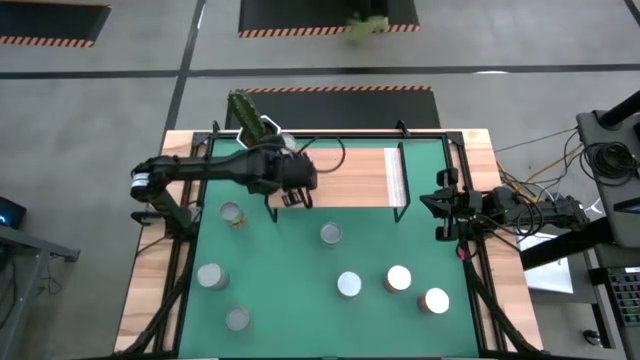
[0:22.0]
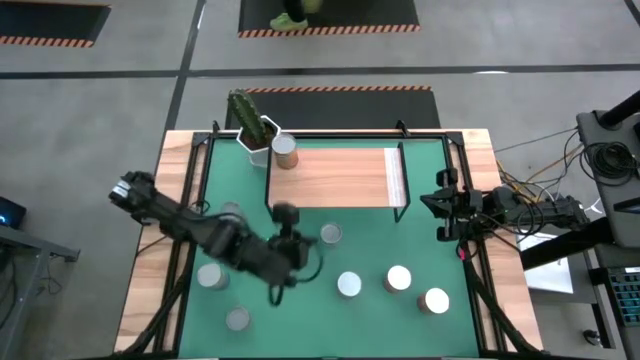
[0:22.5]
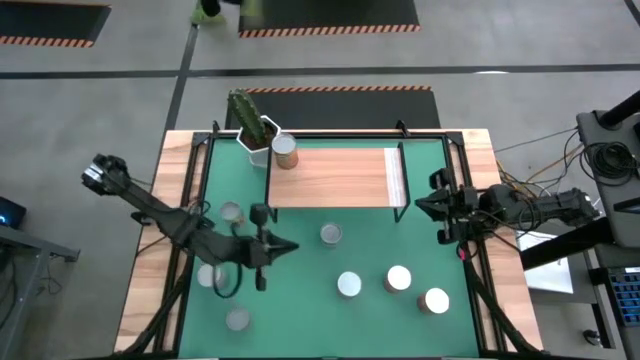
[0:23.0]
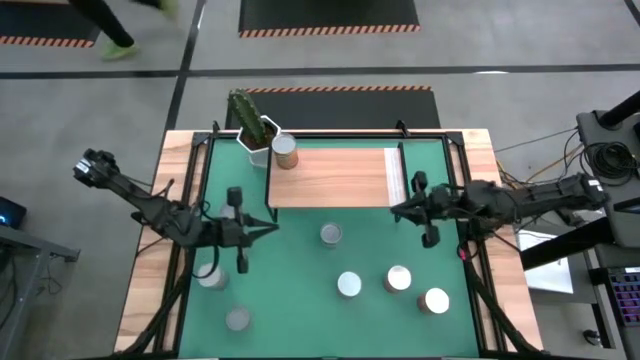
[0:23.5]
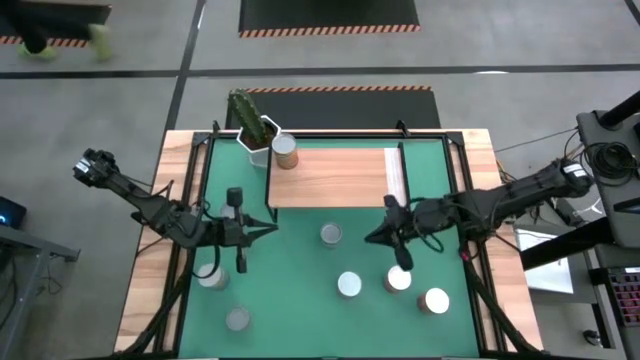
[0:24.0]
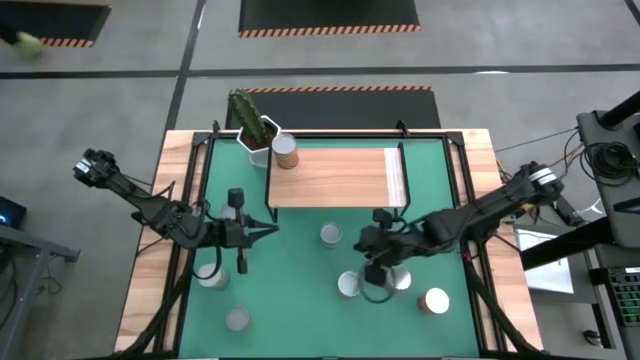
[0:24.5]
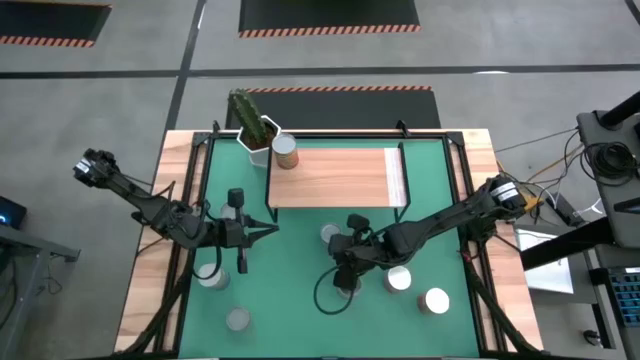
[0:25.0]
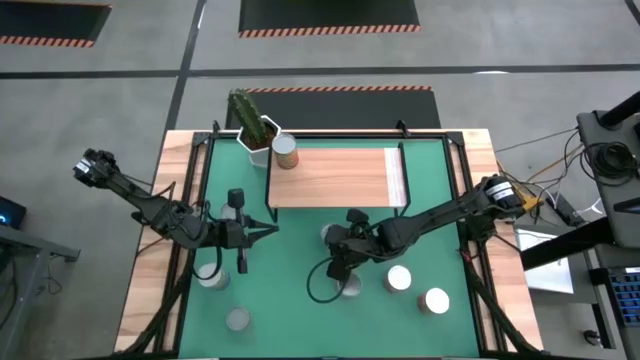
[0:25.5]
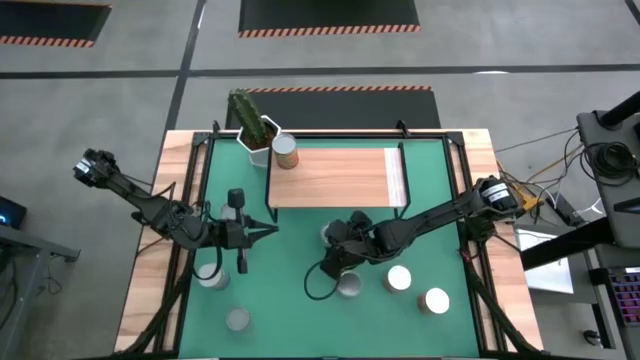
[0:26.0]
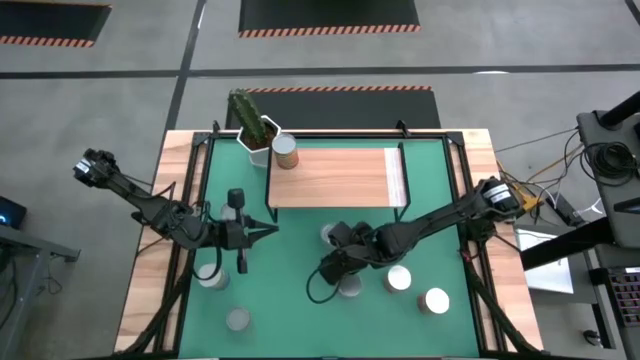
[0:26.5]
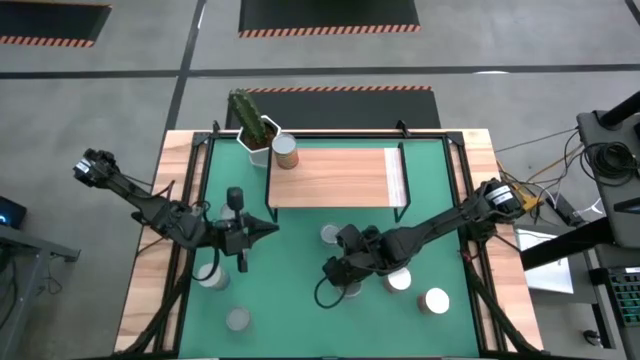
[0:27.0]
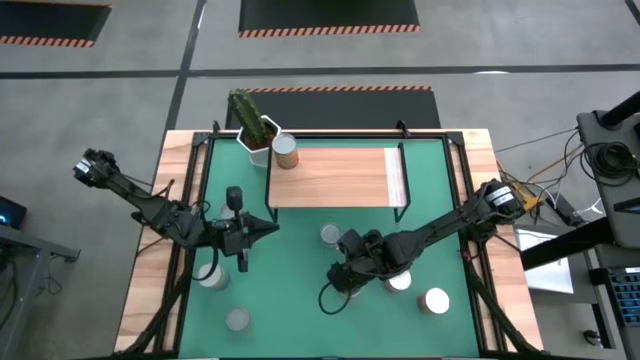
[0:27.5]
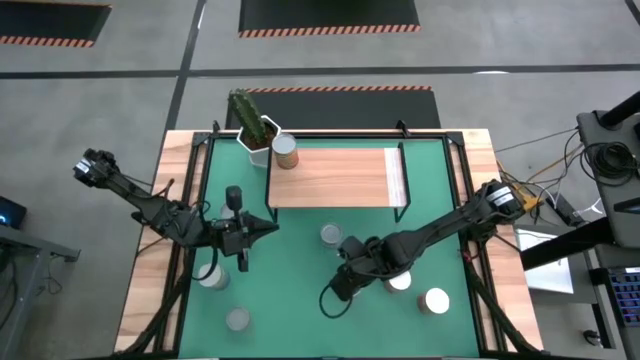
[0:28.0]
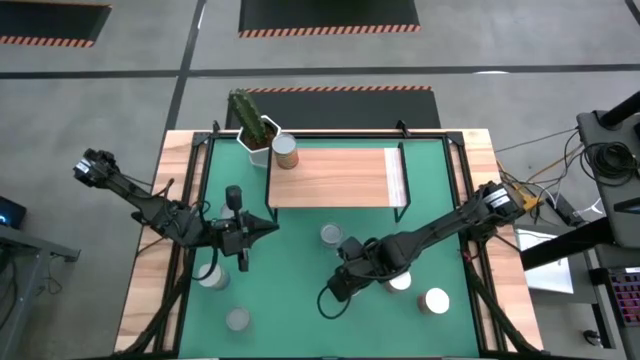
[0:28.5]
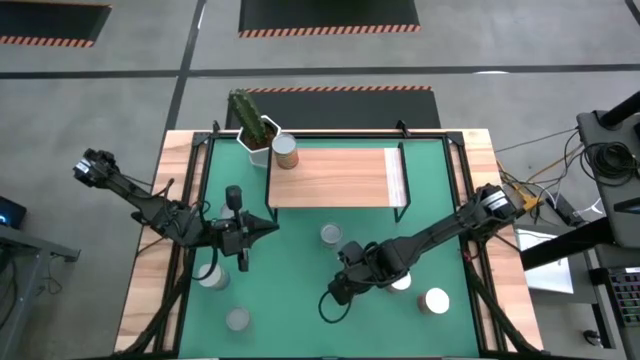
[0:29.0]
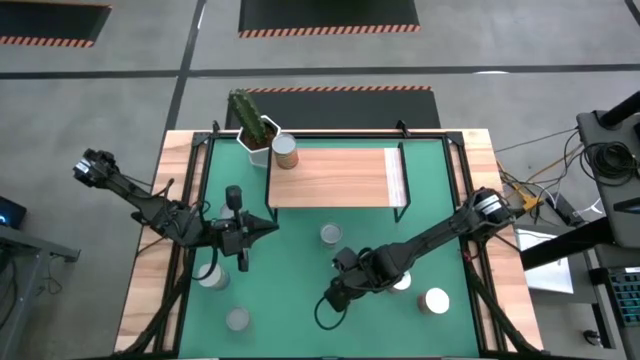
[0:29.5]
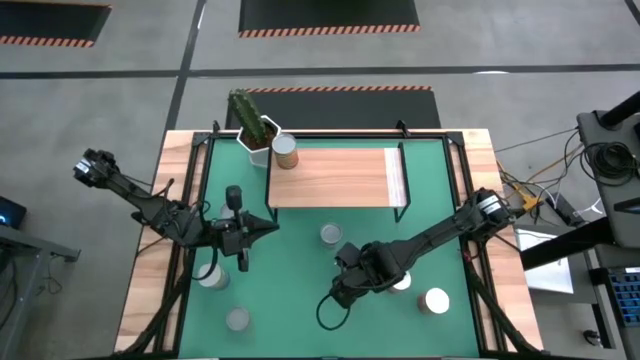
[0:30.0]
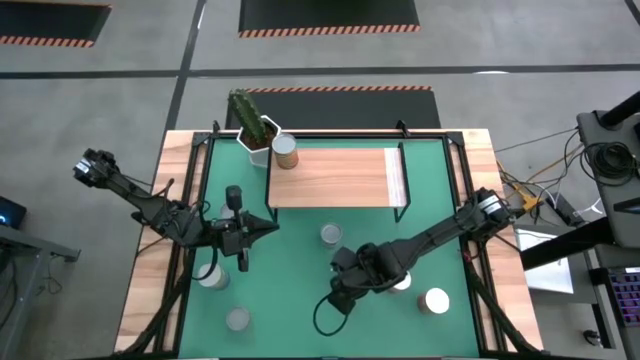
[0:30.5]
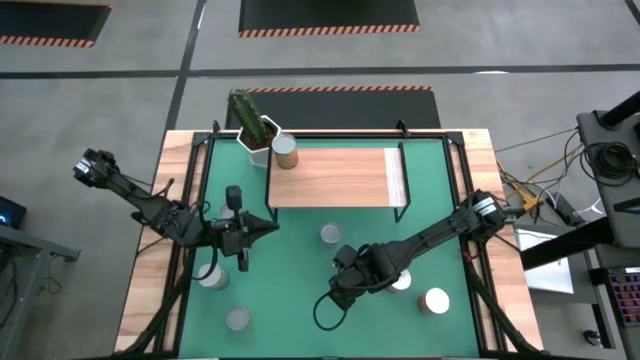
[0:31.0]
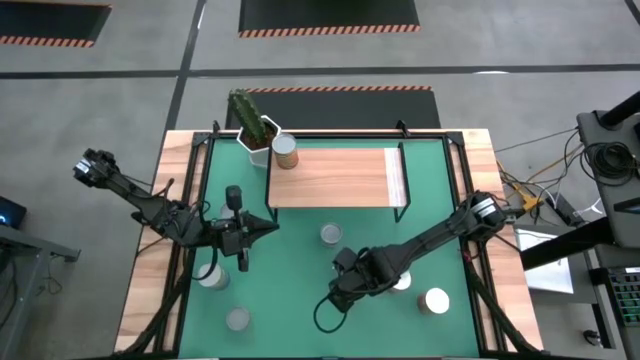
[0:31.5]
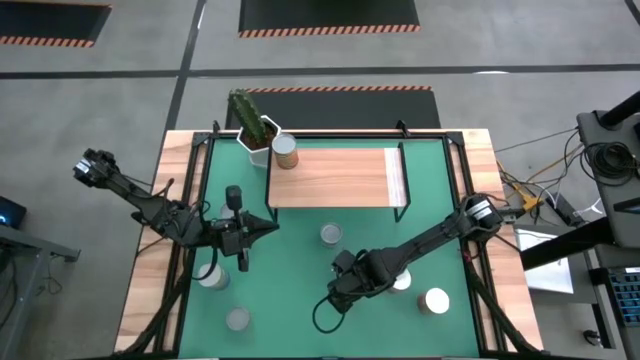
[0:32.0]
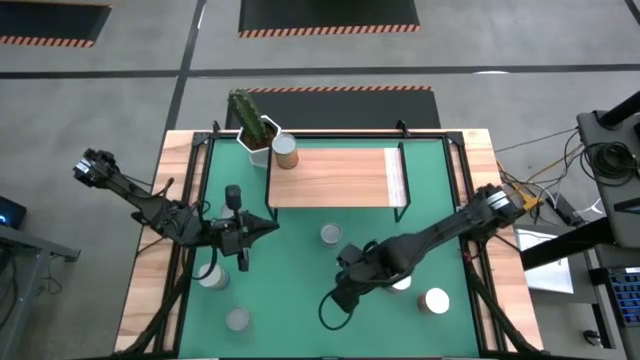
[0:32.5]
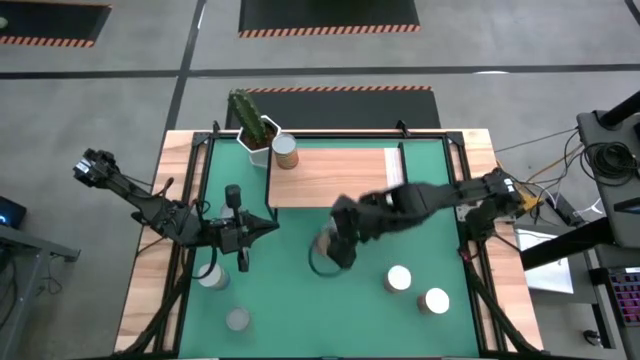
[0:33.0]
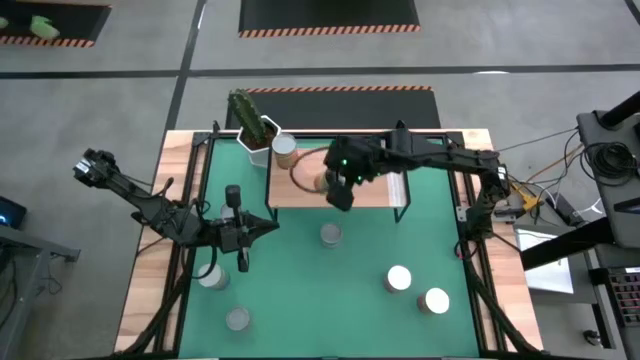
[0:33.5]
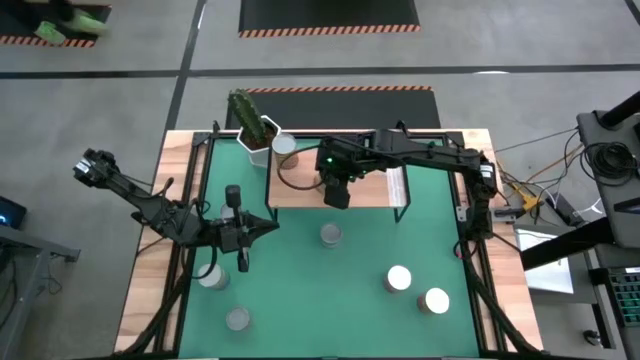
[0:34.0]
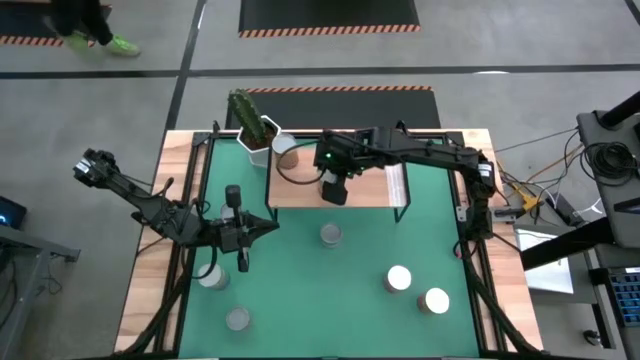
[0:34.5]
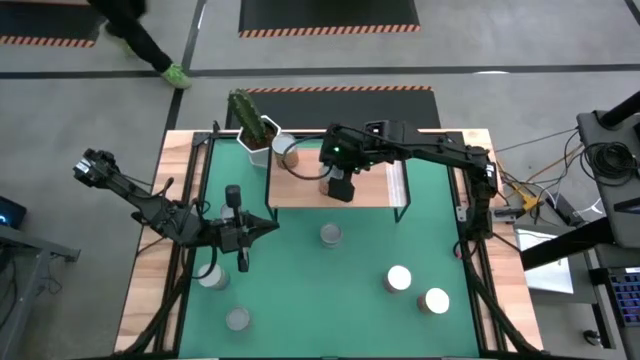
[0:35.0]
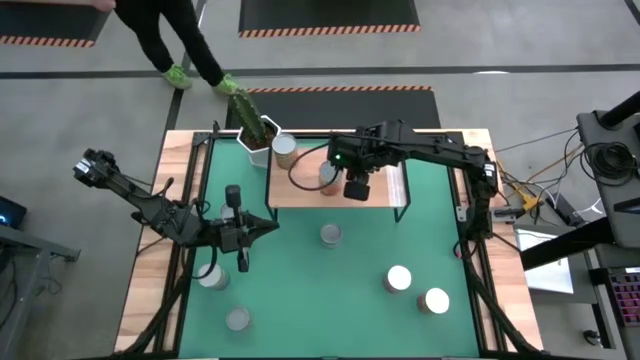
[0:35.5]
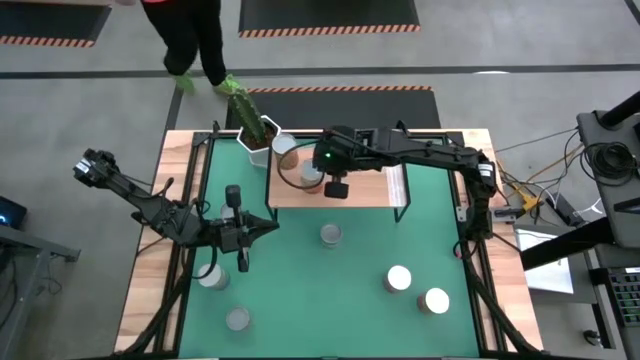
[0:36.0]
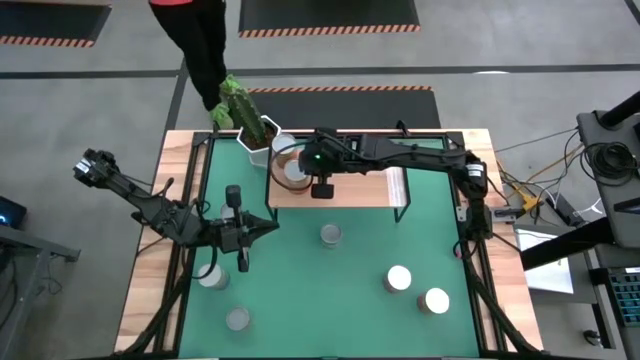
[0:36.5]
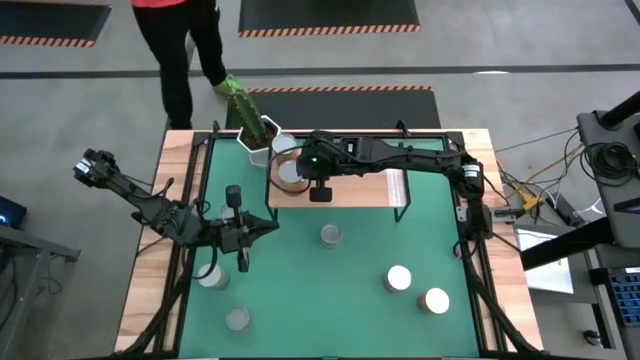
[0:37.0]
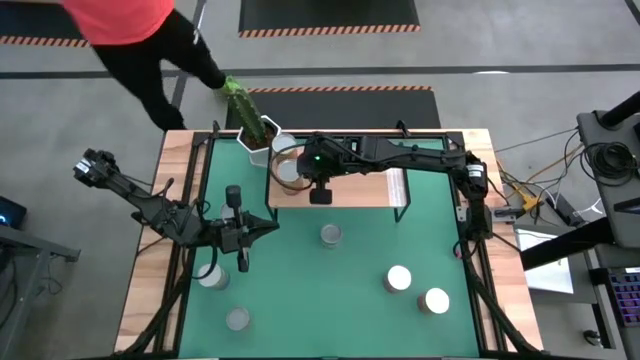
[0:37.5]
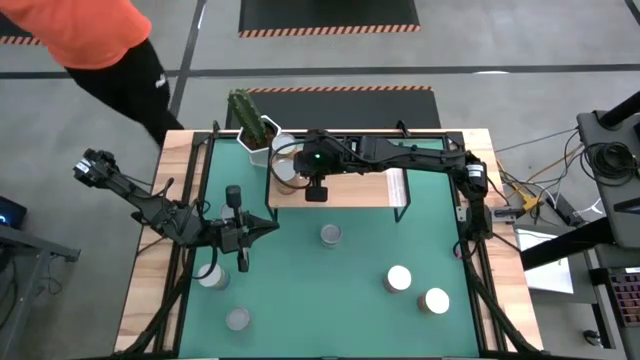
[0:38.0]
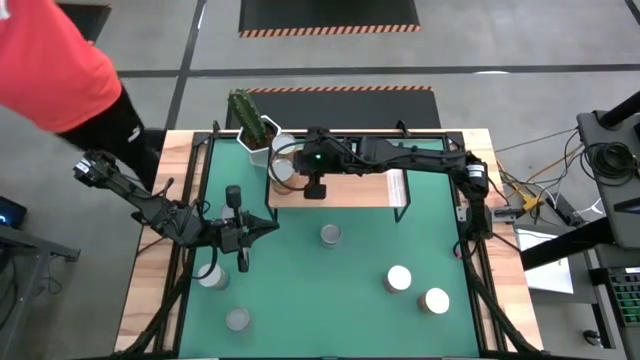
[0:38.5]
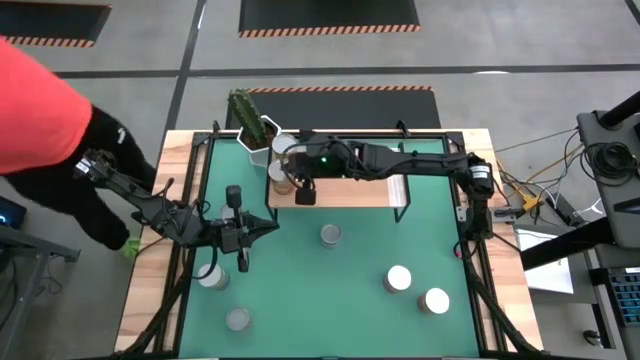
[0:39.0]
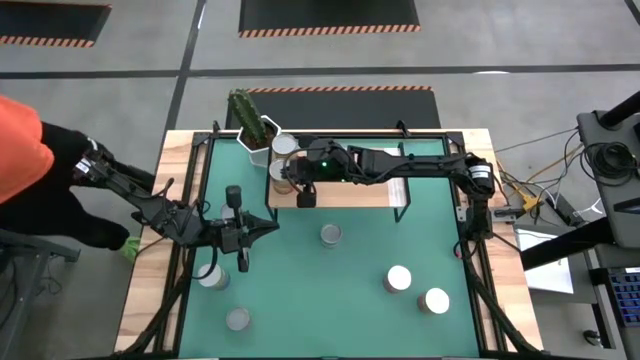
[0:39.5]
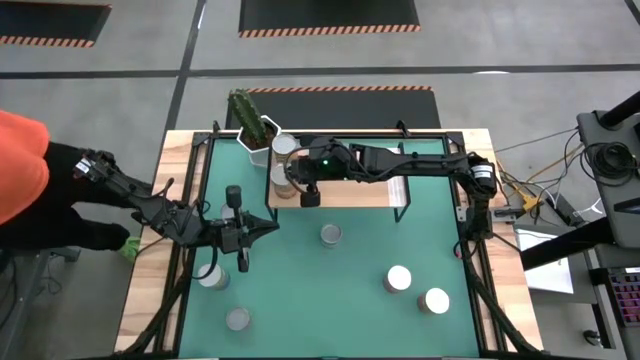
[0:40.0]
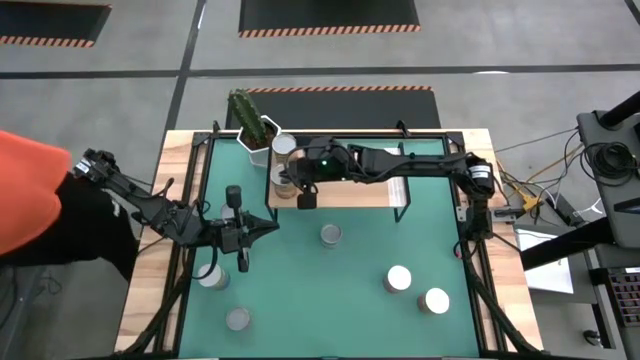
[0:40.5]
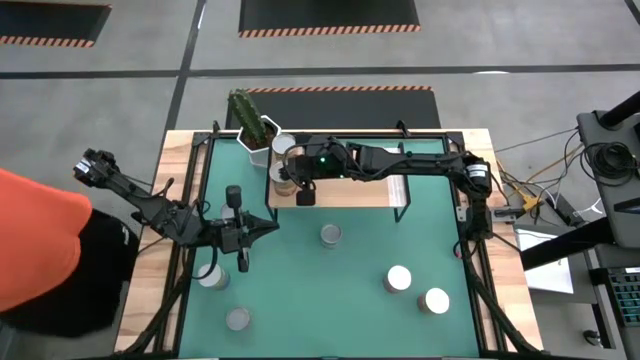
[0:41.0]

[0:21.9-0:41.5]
Task: Pick and place cans onto a shelf
Put the left canned corn on the shelf

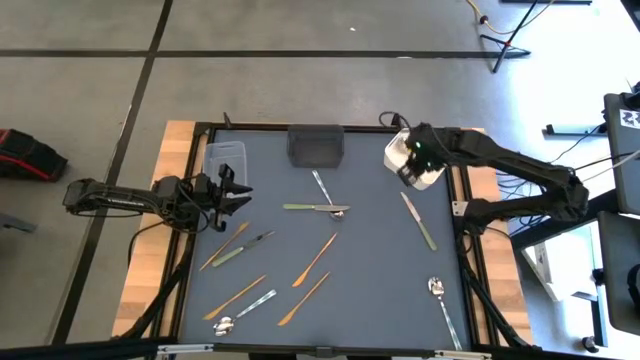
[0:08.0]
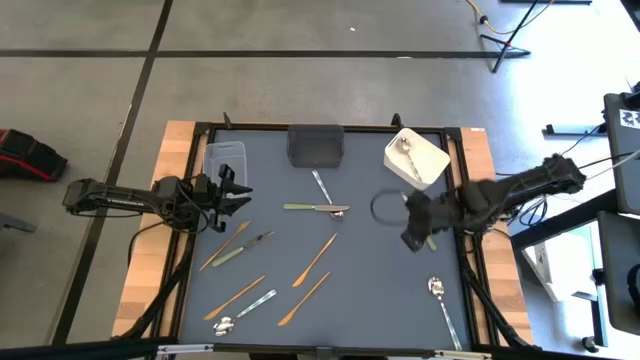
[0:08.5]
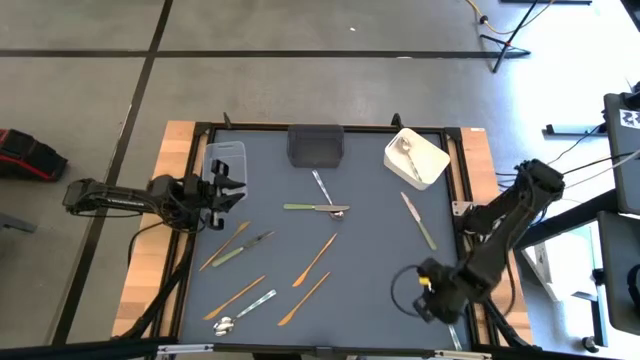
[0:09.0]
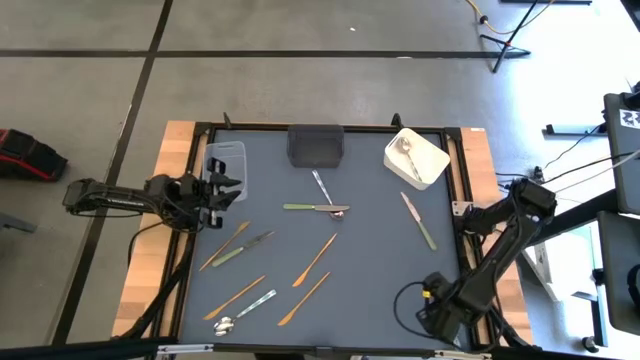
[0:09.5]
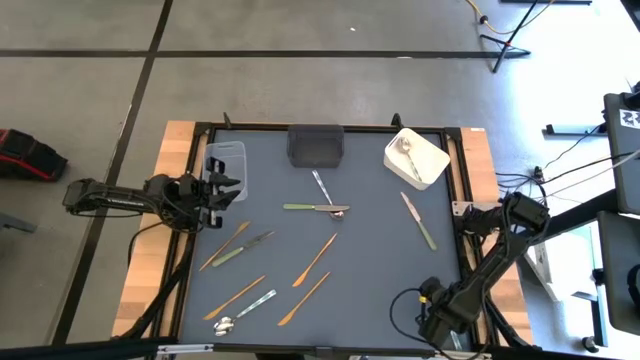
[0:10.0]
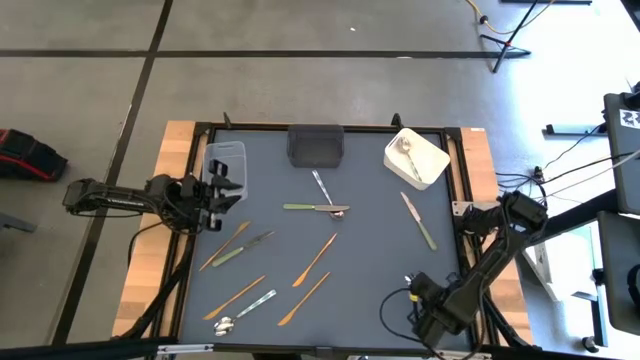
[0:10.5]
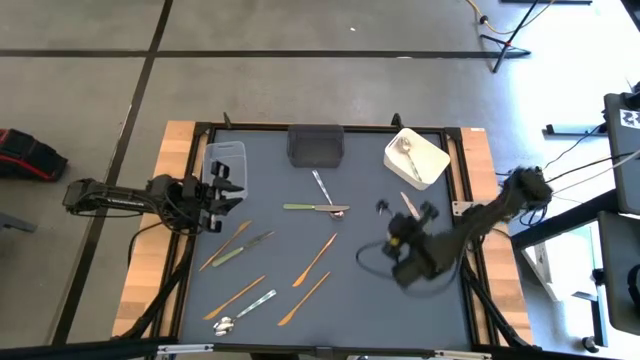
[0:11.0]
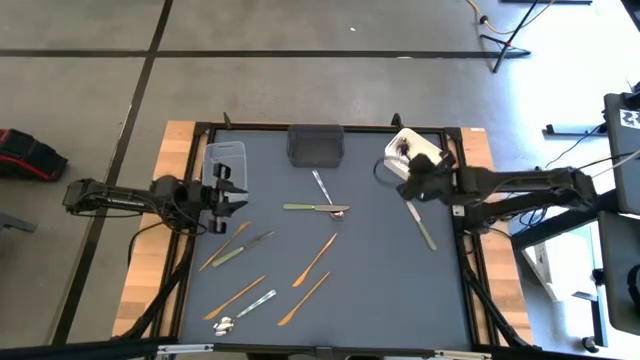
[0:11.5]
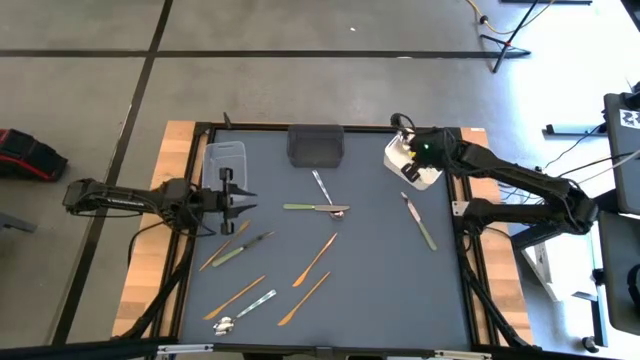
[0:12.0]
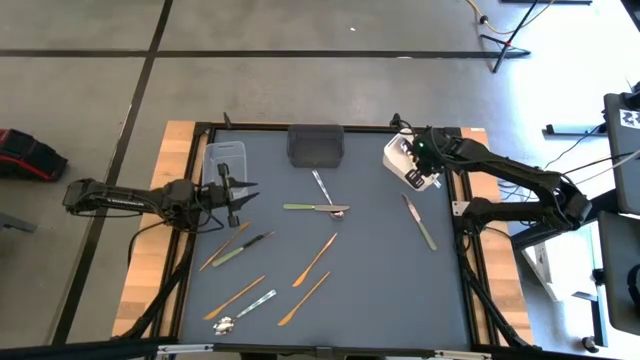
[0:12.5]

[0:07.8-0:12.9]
Task: Sort silverware by color (type)
Put the bottom right blue spoon into the white bin
